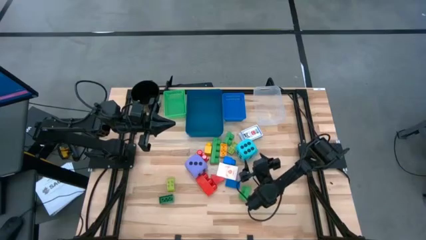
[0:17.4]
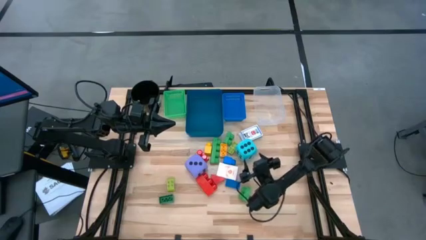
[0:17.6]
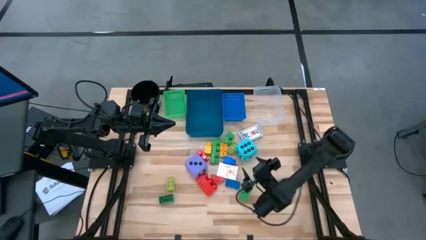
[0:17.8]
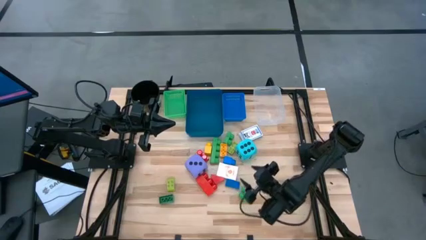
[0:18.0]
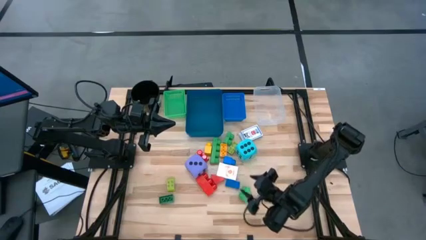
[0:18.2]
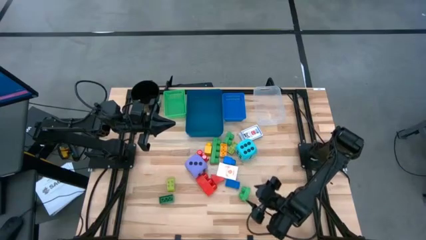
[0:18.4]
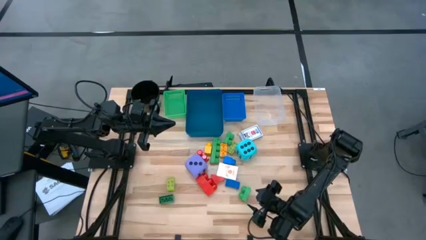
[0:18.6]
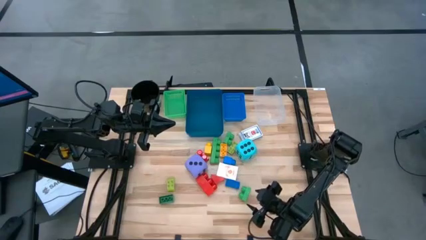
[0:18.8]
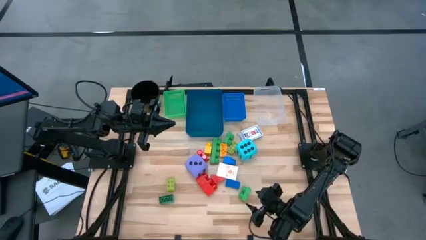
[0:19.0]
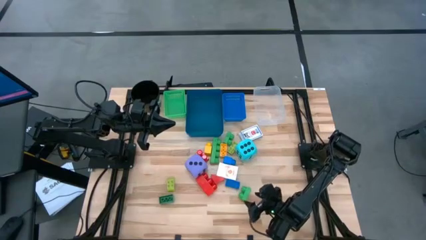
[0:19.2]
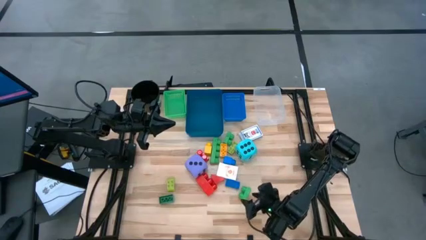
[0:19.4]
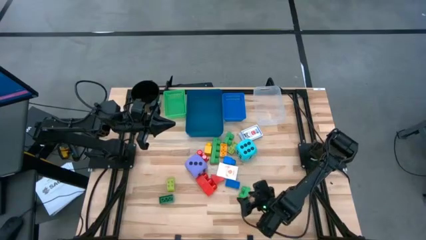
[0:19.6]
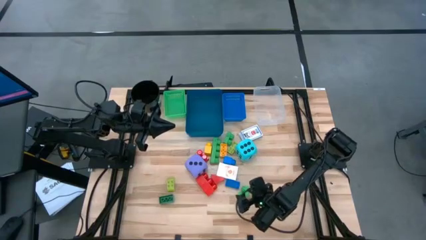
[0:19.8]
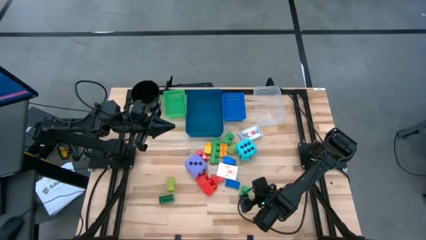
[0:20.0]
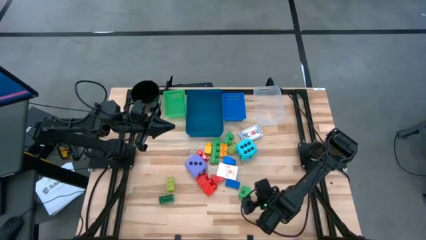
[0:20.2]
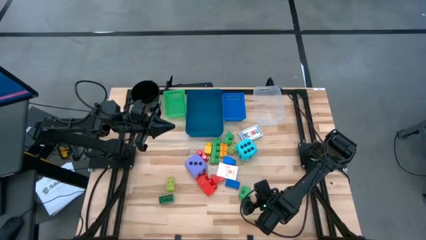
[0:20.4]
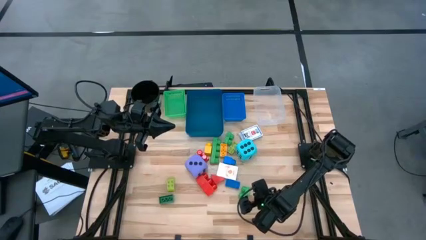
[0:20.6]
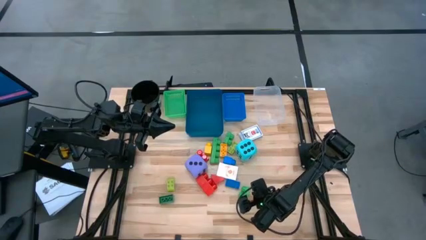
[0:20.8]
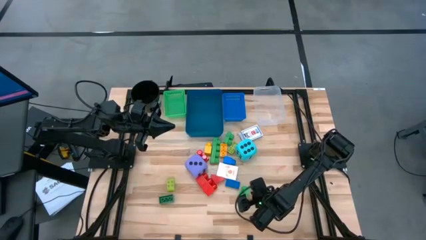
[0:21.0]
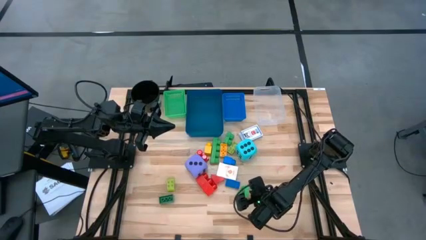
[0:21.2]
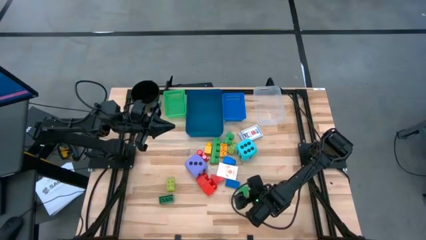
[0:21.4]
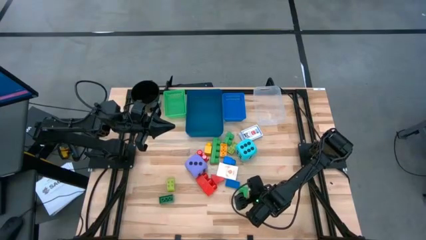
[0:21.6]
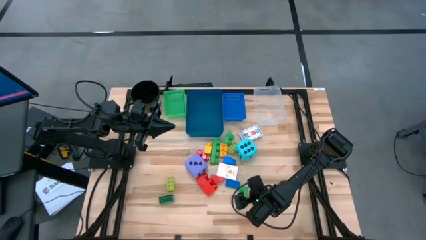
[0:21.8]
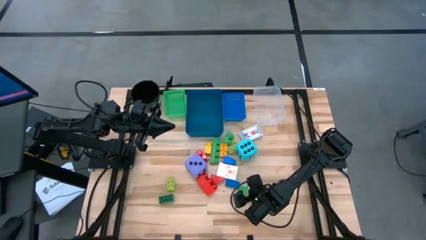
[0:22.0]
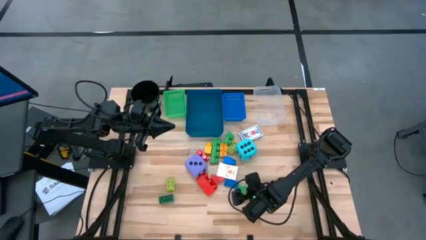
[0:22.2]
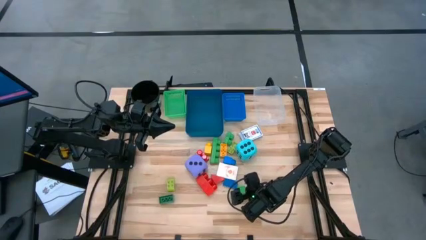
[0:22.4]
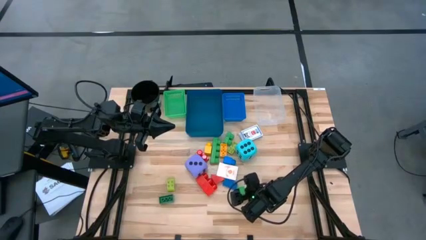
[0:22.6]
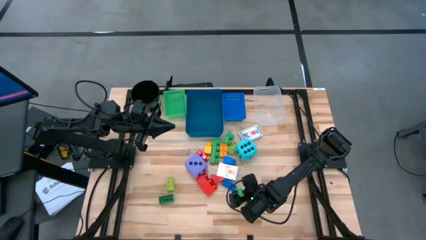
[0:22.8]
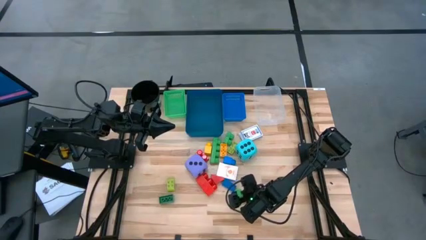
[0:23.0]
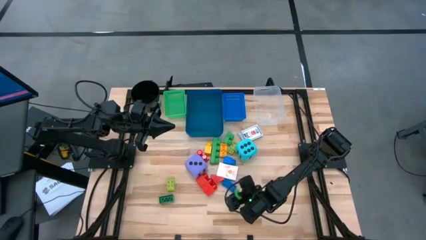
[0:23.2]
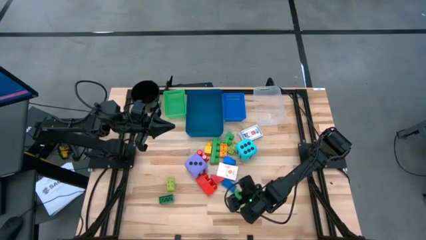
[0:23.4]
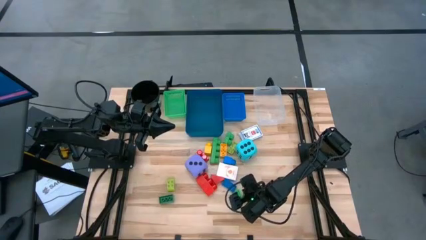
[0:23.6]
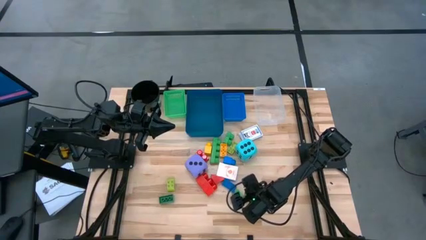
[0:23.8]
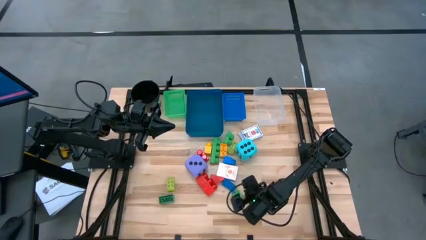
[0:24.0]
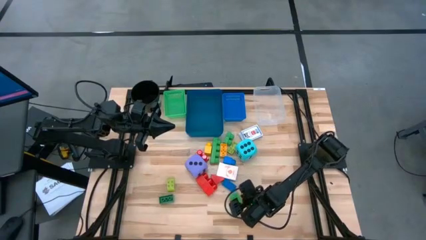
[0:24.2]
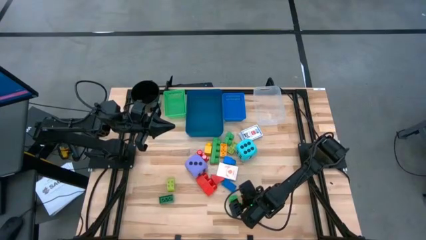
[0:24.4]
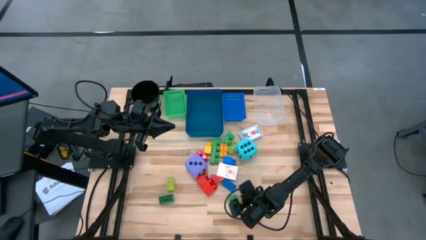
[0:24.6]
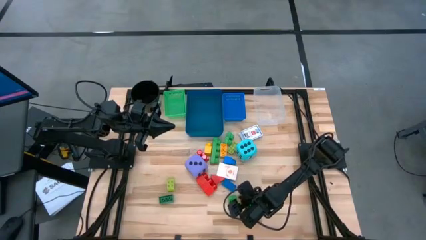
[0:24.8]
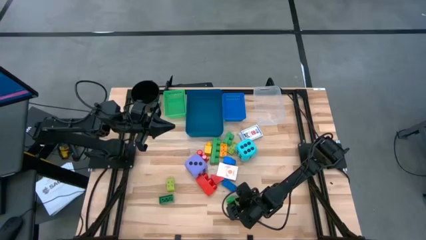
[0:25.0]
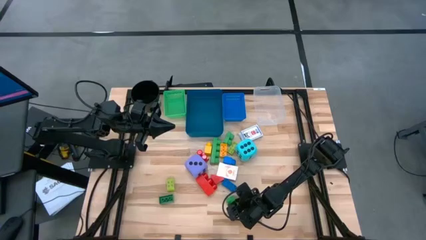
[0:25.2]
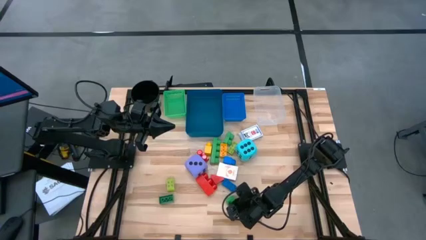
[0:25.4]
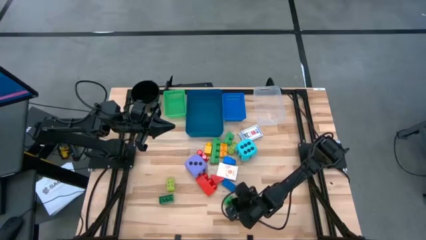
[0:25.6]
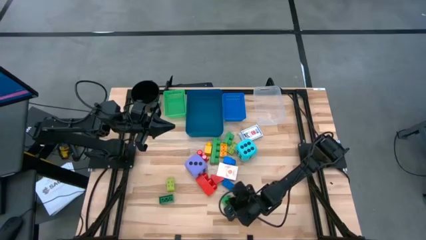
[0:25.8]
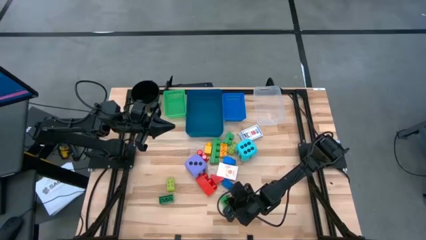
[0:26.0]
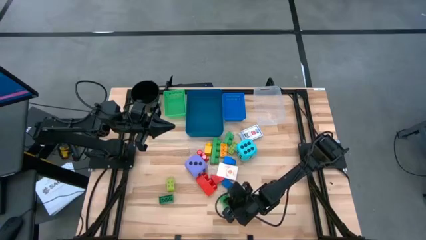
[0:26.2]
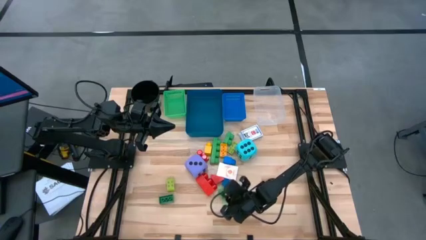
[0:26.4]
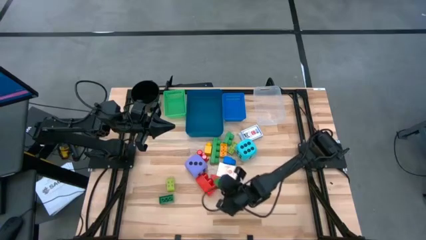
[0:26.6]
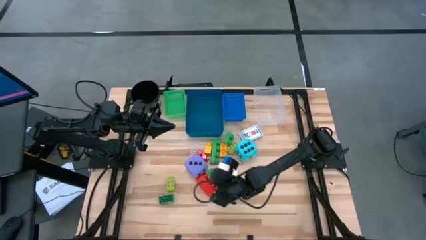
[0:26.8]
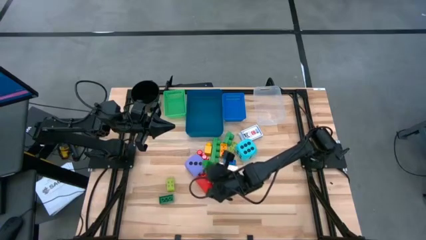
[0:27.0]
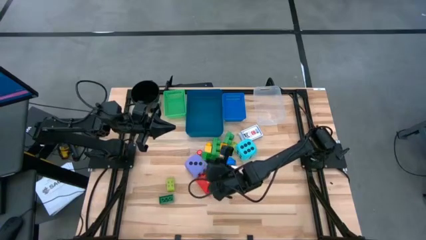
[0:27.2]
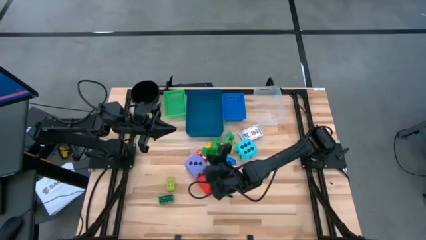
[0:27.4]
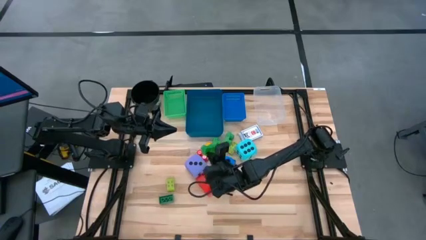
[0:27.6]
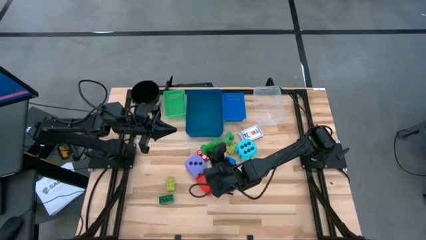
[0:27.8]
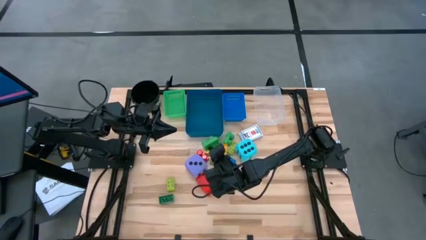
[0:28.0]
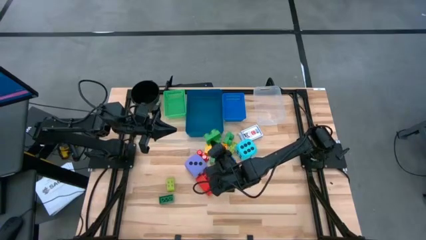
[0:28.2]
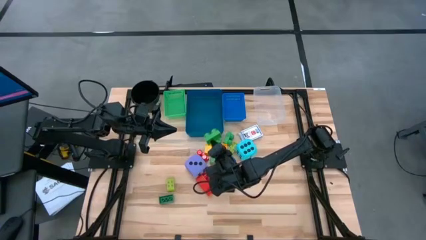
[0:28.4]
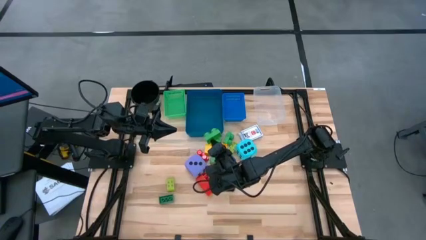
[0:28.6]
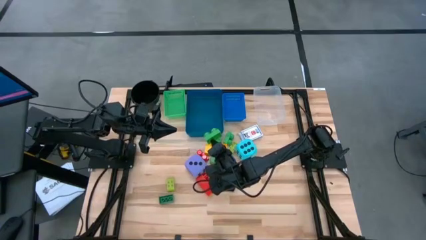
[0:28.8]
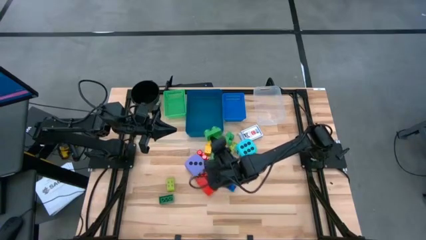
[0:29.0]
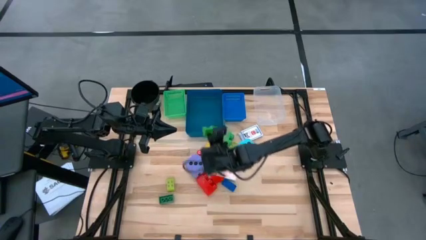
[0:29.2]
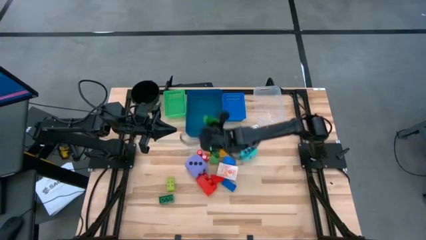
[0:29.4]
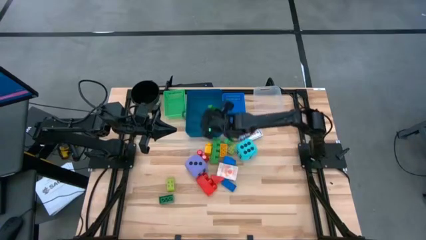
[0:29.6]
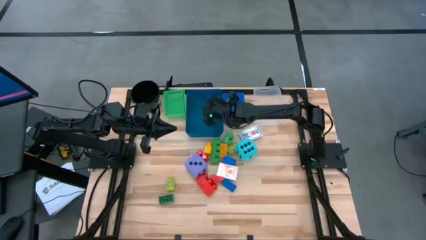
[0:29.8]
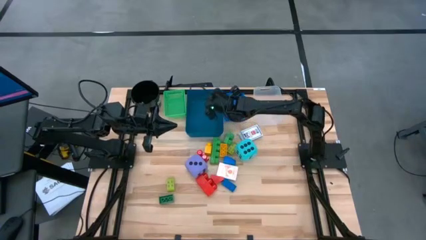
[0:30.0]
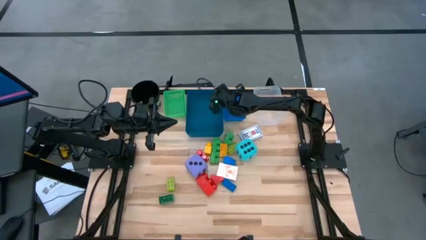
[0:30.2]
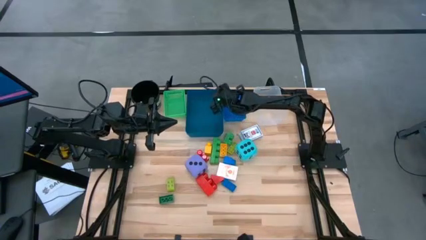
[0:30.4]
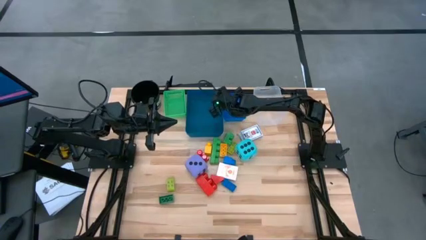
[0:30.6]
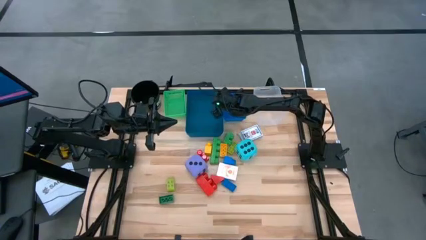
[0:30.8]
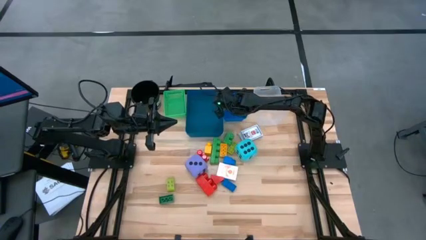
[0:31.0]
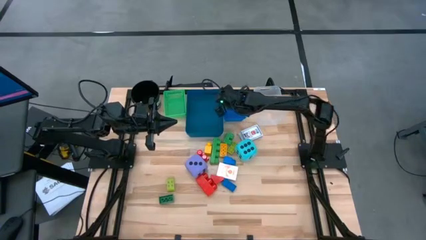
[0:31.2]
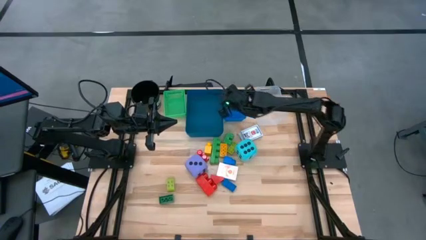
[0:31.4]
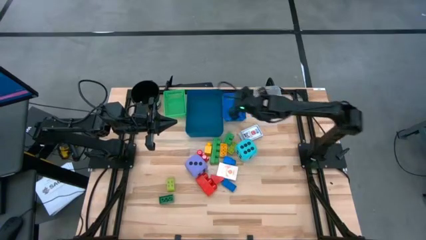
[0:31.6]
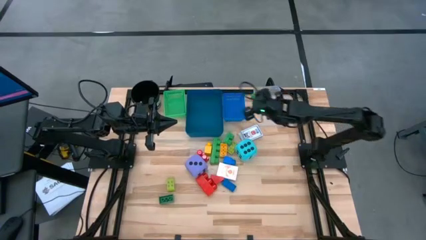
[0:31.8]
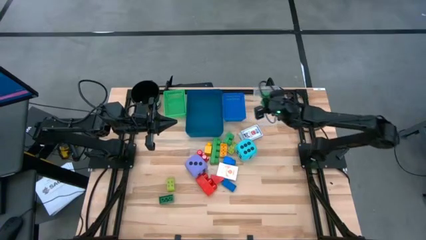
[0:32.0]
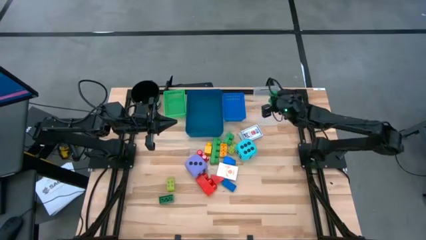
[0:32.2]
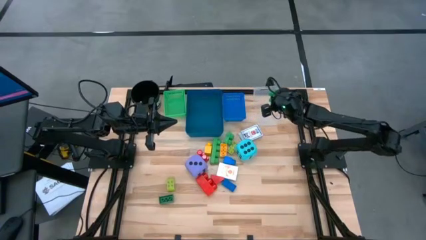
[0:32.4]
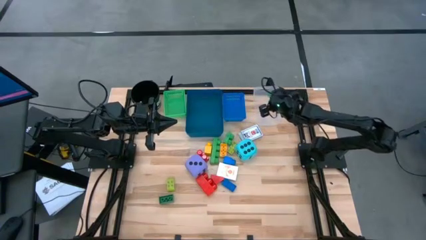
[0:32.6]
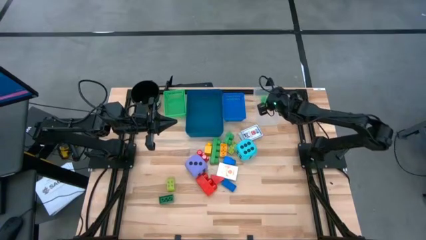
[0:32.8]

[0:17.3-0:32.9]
Task: Pick & Place Toys
Put the large green game piece into the transparent bin
